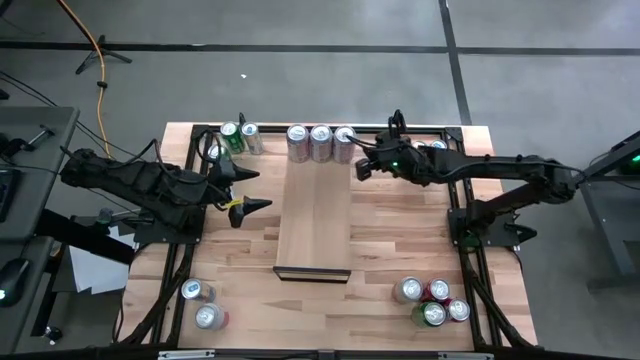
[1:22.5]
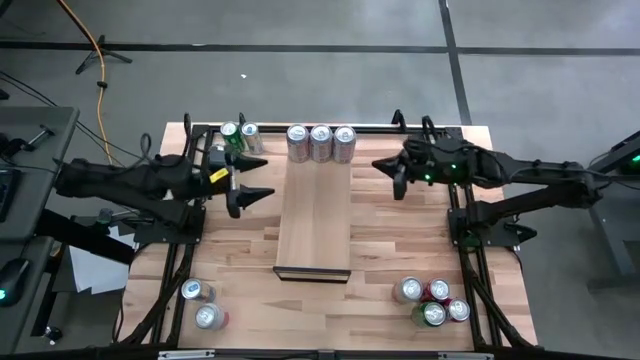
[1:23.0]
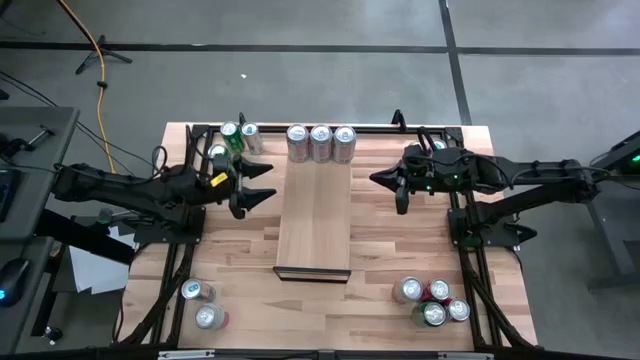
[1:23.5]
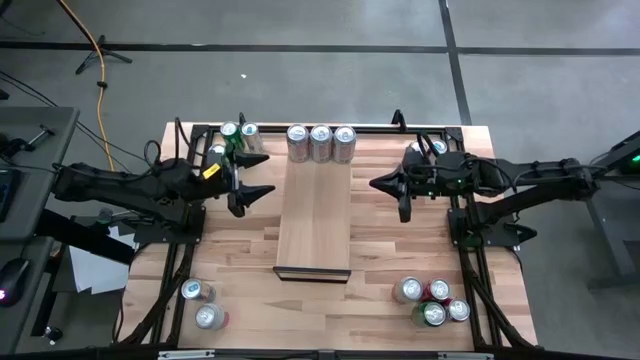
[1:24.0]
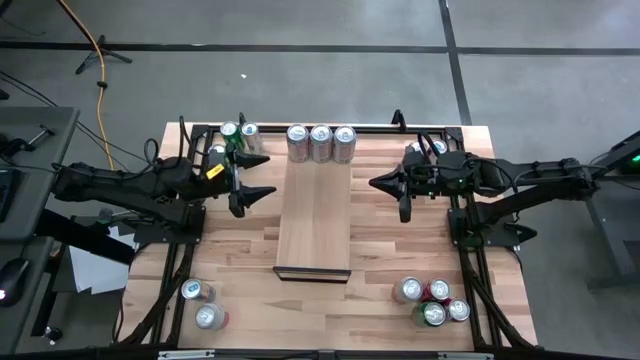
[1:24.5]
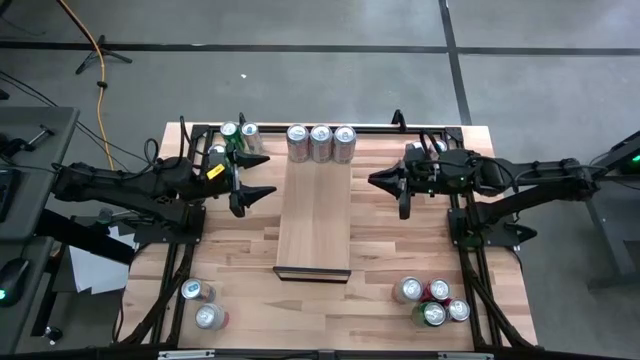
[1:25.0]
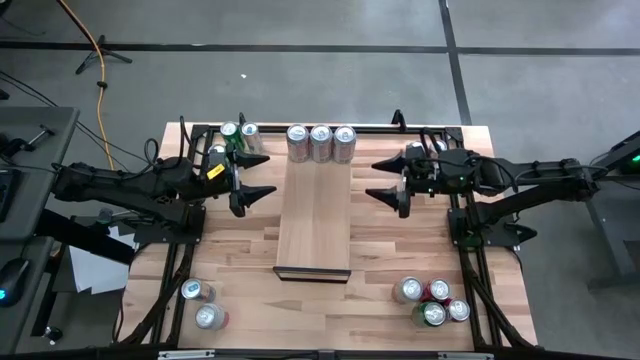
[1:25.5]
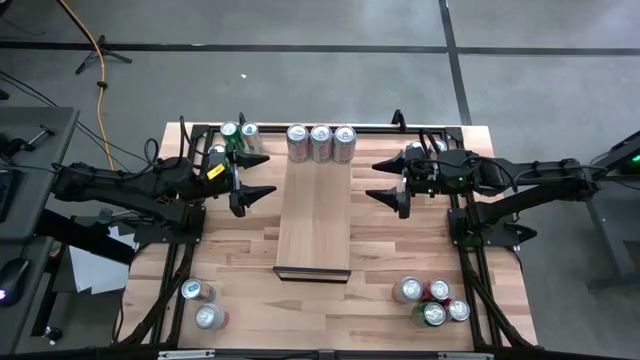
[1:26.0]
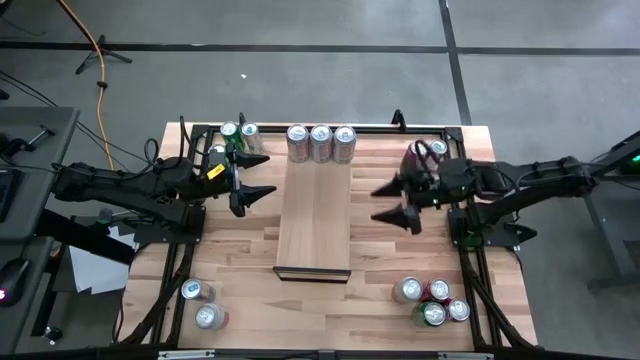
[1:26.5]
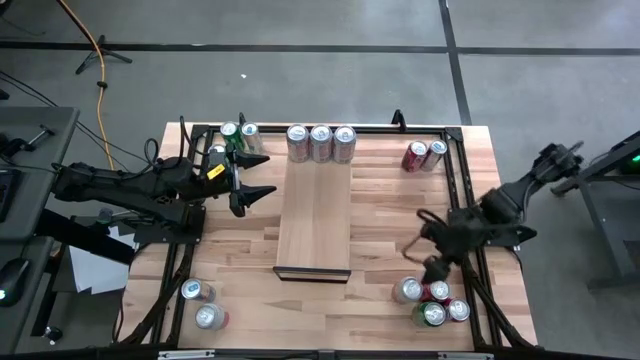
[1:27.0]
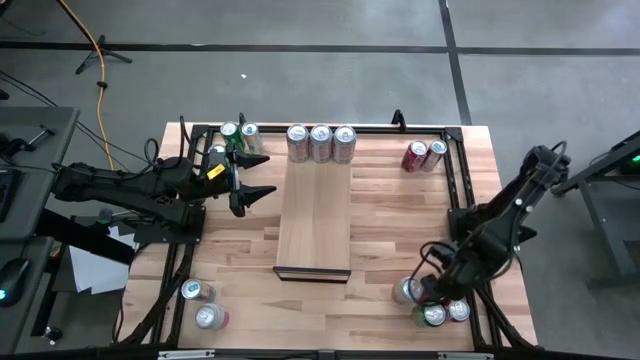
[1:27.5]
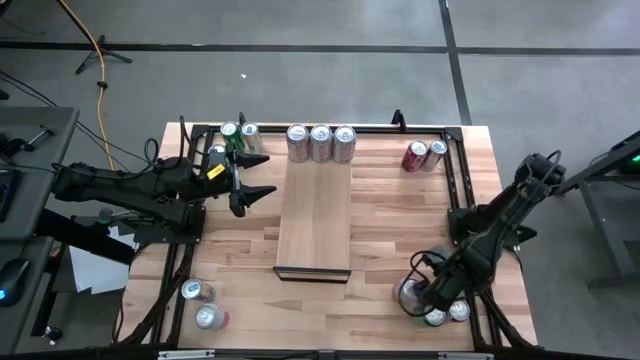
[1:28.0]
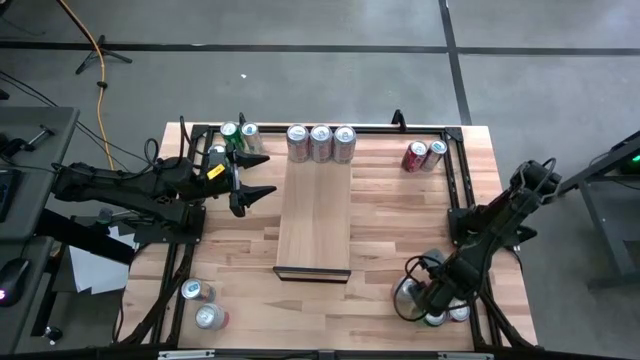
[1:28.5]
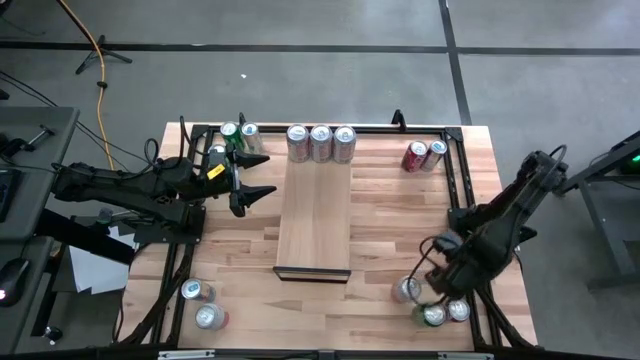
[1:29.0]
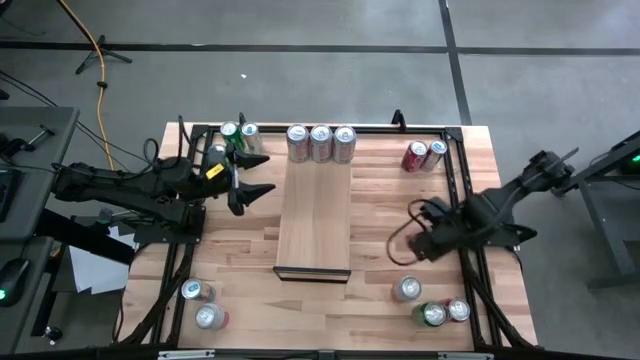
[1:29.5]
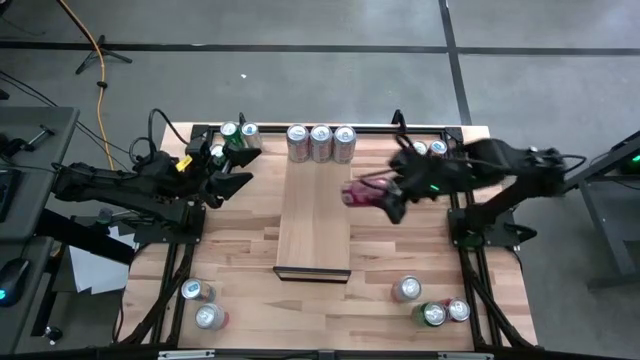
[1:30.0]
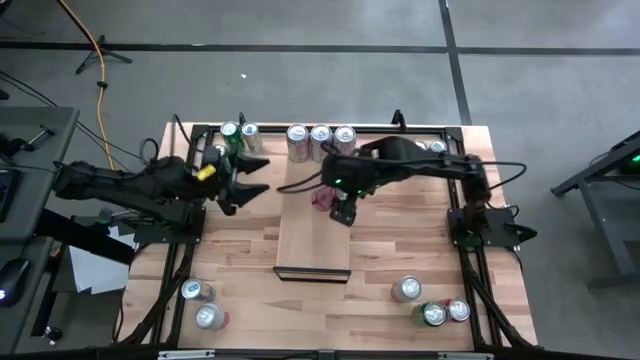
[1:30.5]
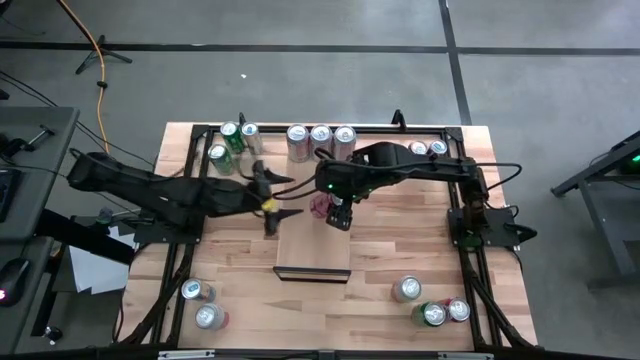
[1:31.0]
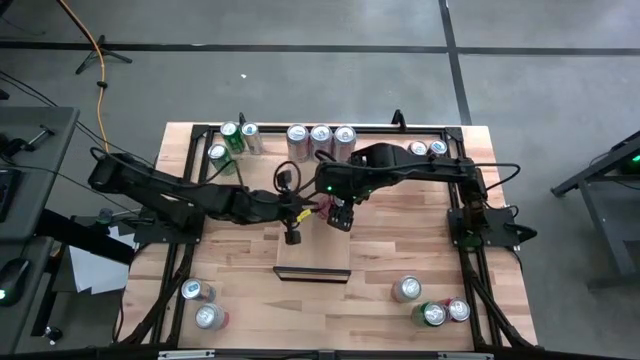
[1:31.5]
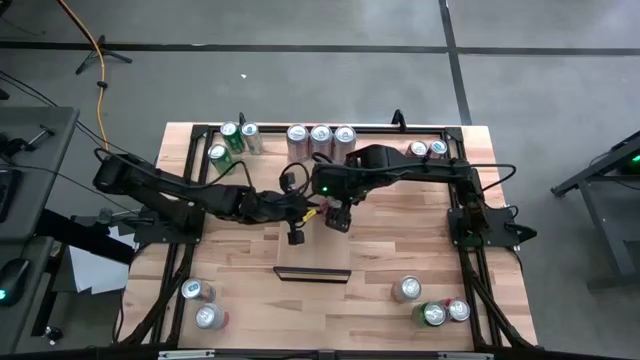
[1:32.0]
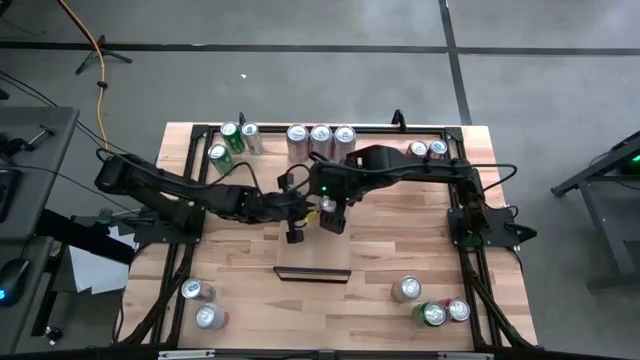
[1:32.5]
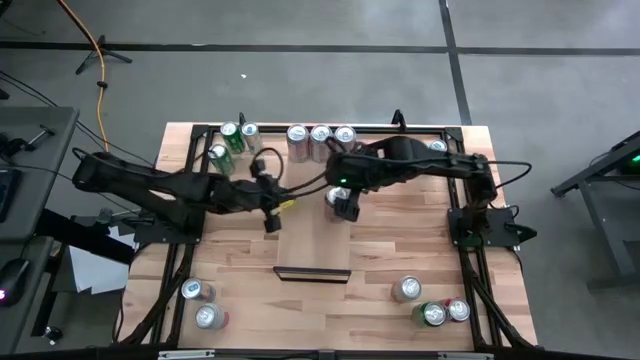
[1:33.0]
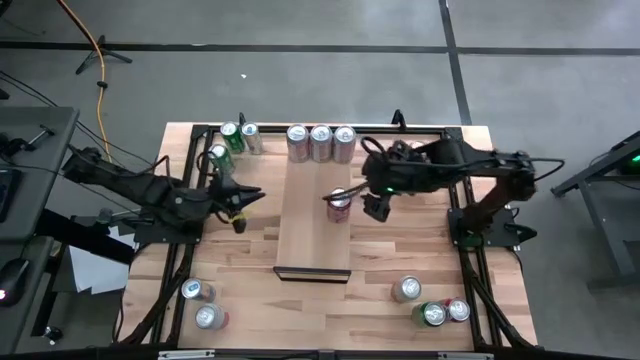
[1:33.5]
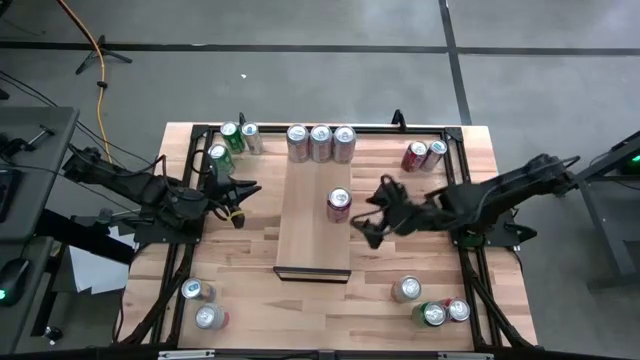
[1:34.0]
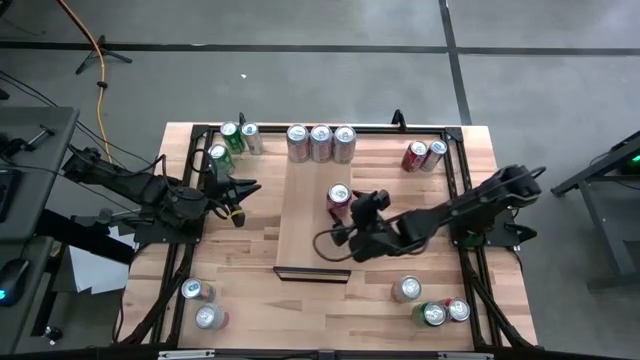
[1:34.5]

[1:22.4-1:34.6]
Task: Place canned beverage on shelf
Put the bottom right red soda can on the shelf

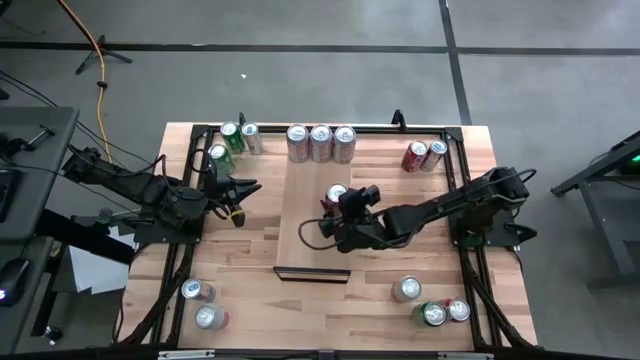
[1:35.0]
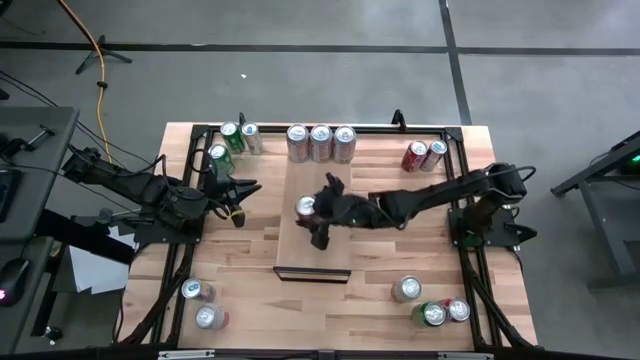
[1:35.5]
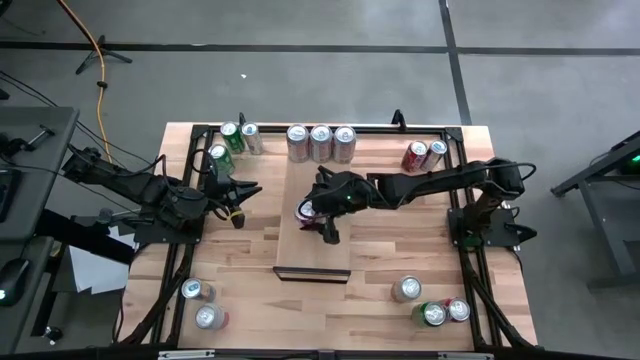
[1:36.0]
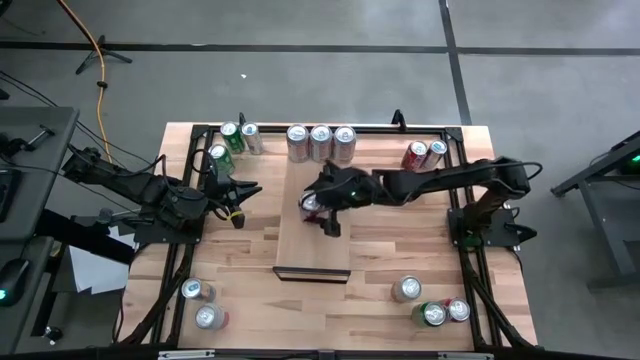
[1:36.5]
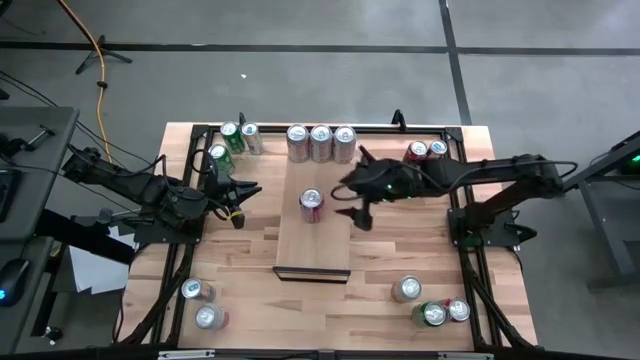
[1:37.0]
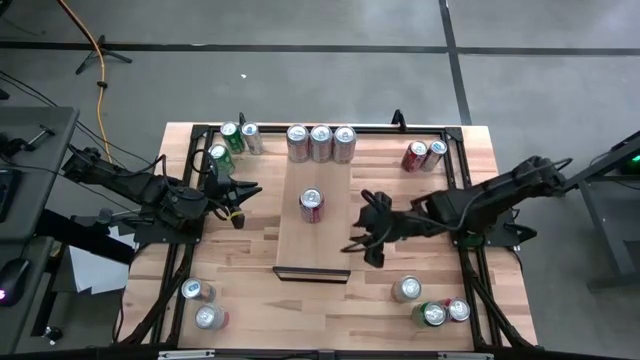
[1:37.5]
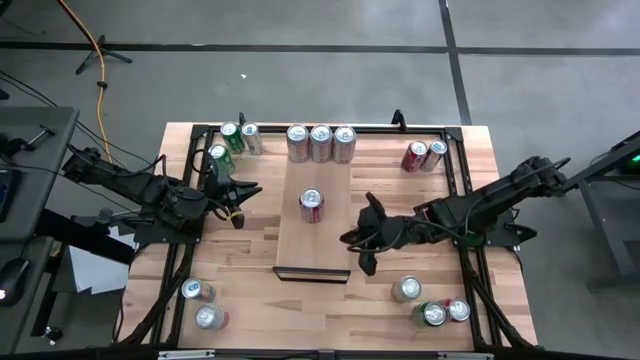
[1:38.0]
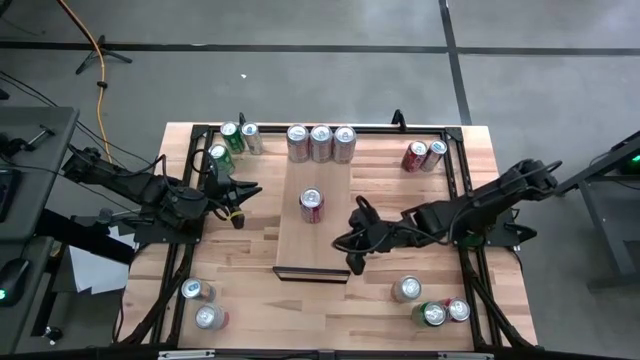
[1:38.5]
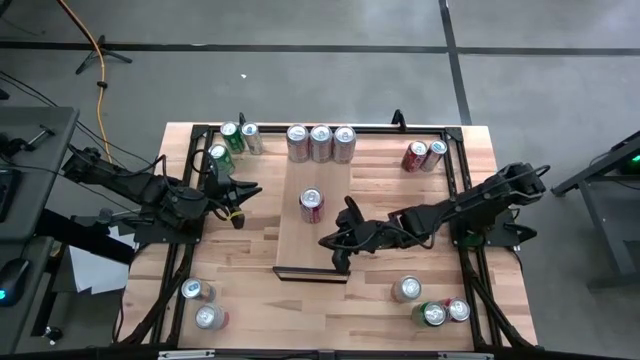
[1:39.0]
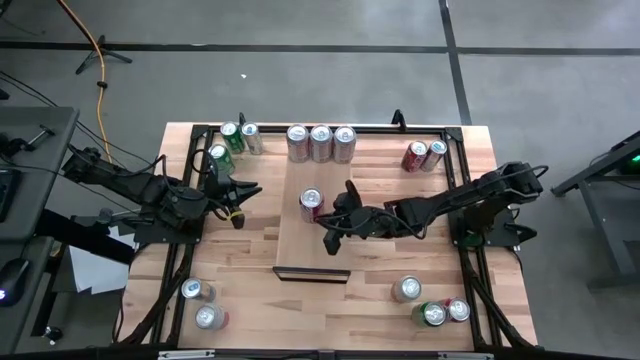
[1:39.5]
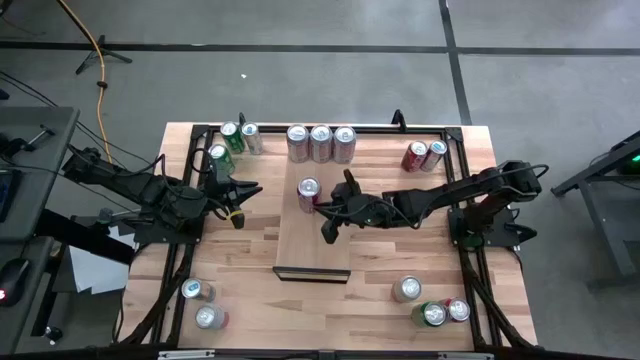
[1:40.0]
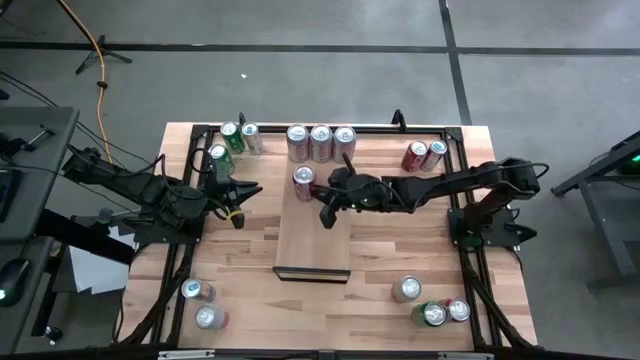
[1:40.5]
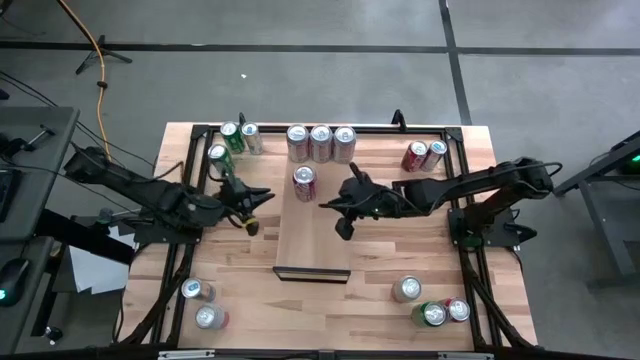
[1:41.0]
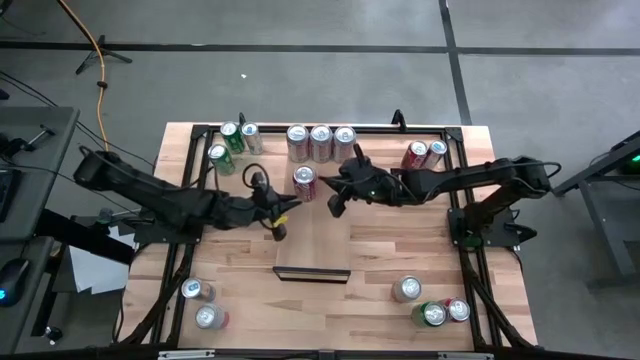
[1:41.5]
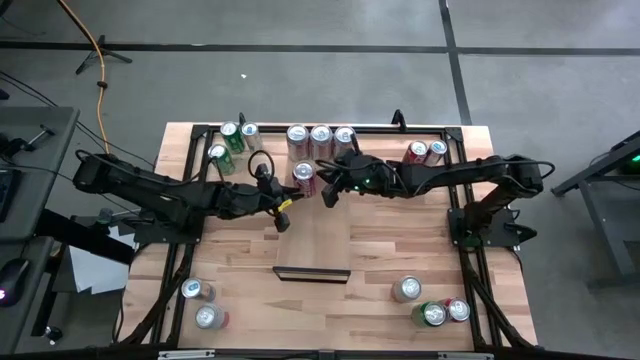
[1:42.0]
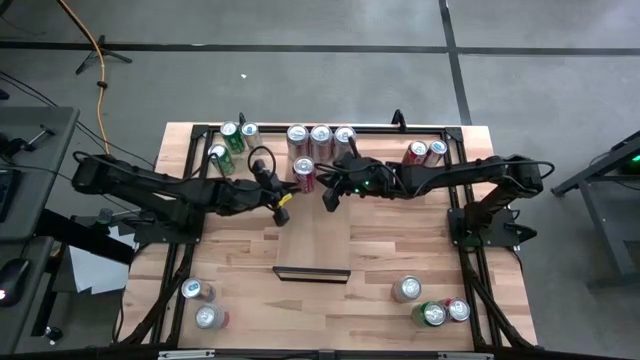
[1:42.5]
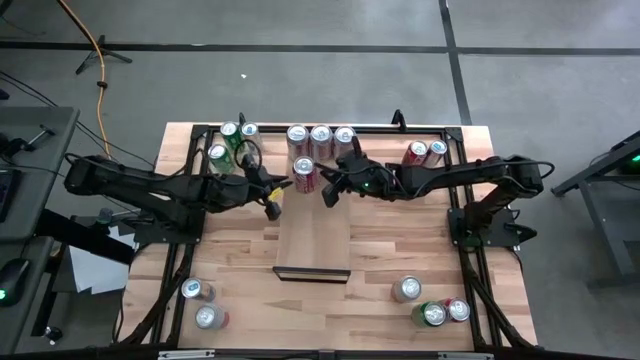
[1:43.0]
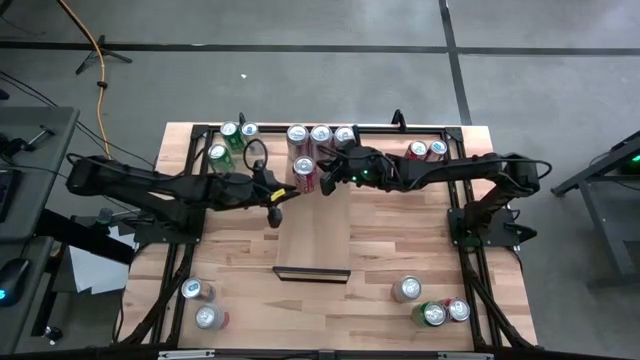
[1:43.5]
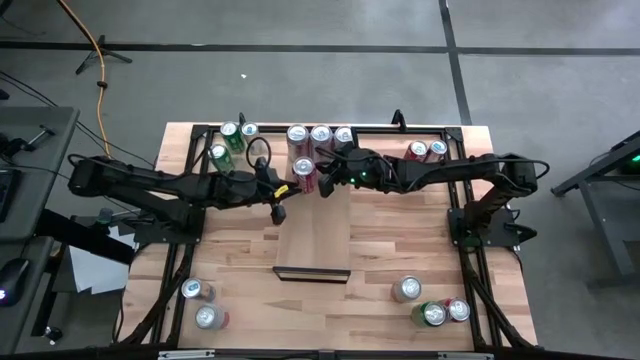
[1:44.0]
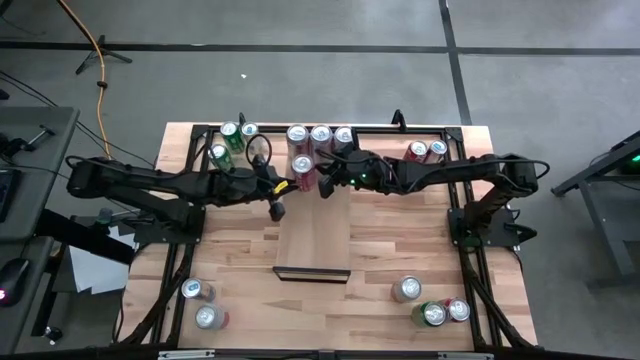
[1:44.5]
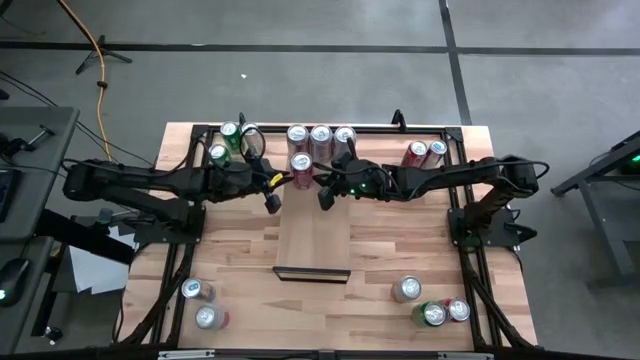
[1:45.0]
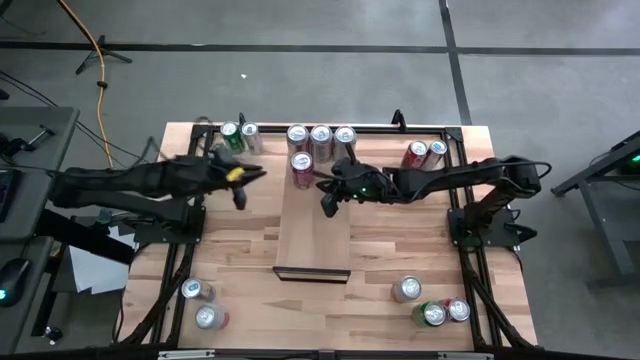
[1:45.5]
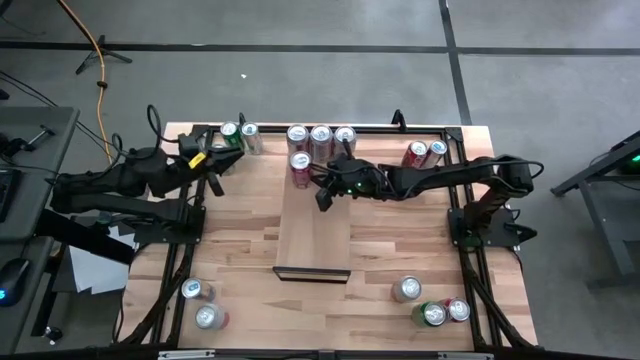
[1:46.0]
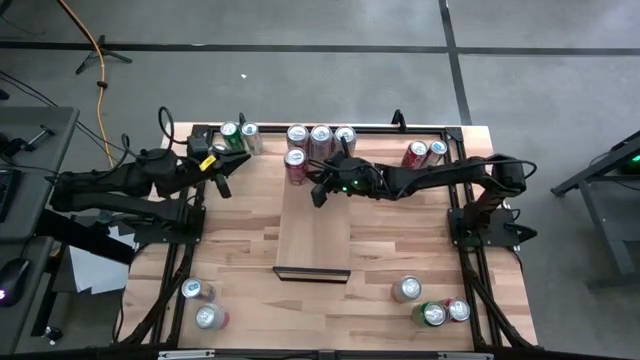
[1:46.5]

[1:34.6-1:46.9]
Put the bottom right red soda can on the shelf
